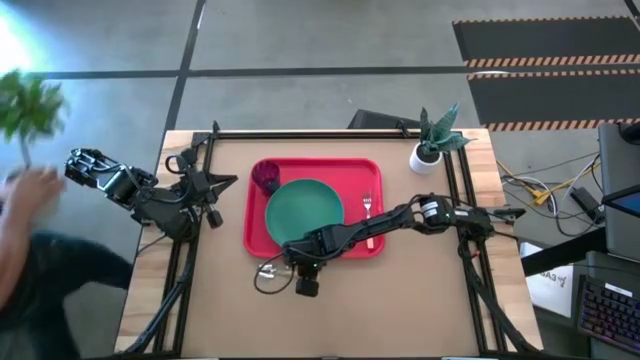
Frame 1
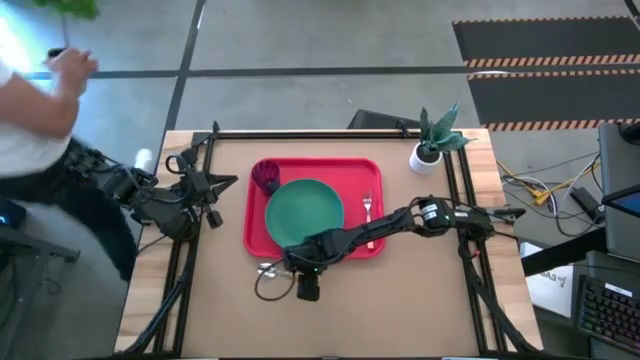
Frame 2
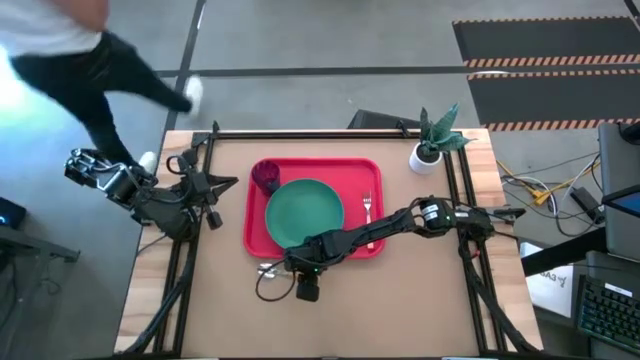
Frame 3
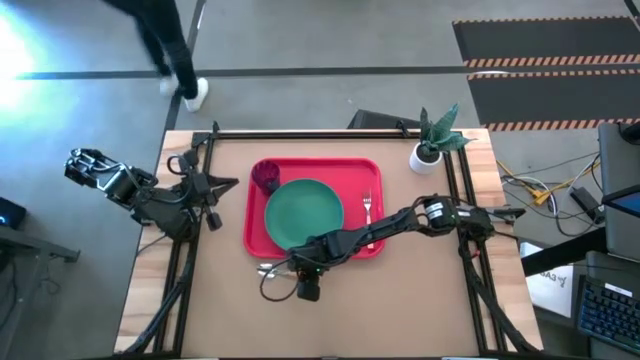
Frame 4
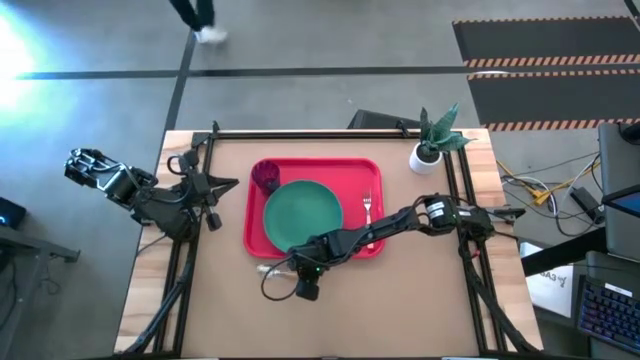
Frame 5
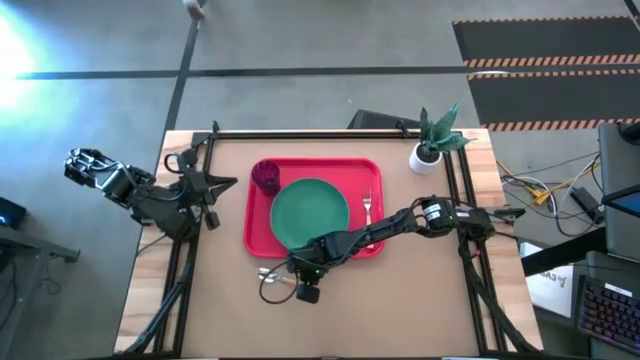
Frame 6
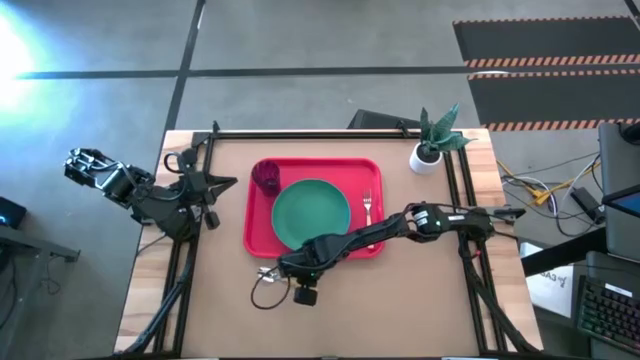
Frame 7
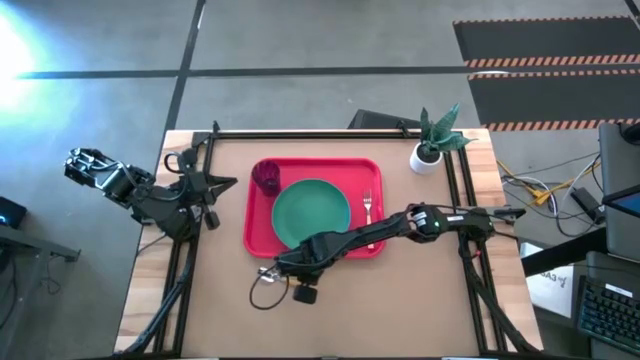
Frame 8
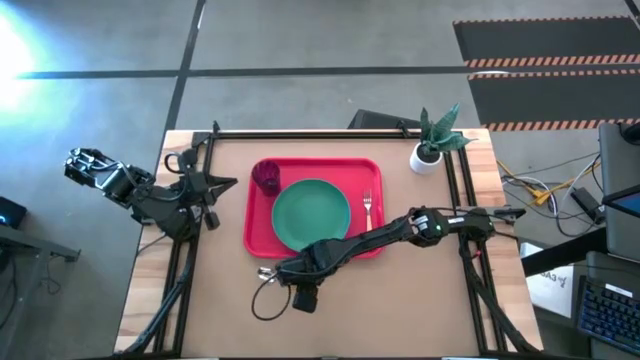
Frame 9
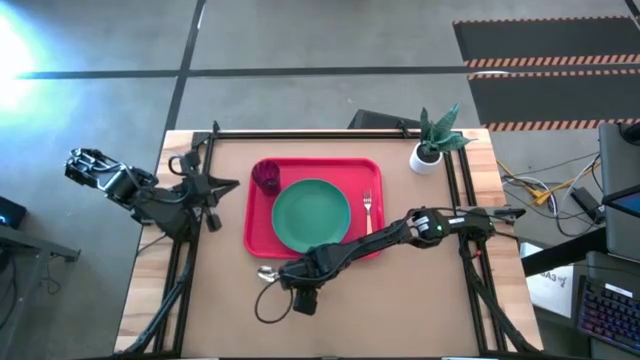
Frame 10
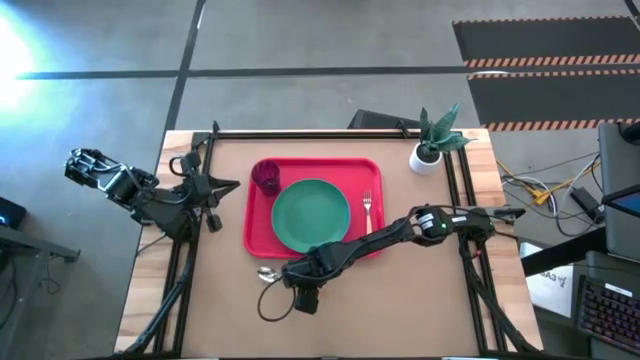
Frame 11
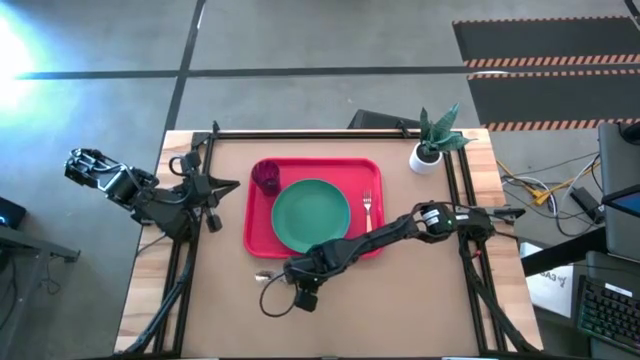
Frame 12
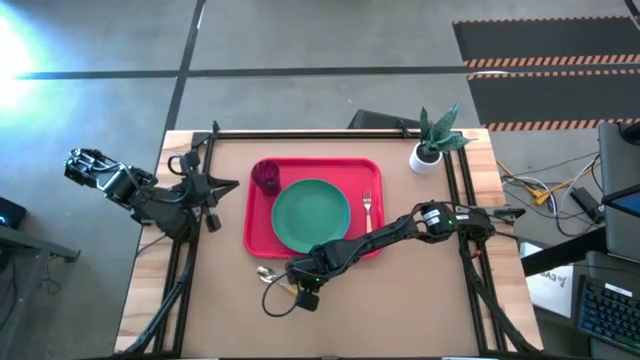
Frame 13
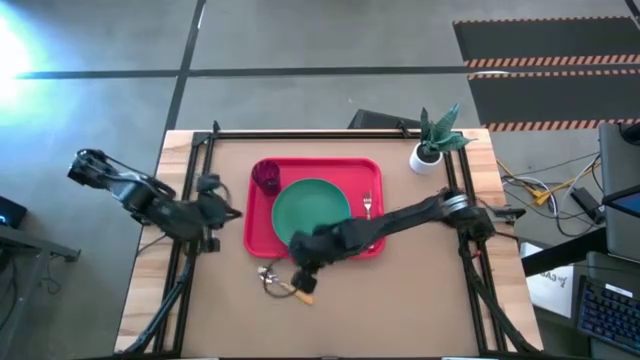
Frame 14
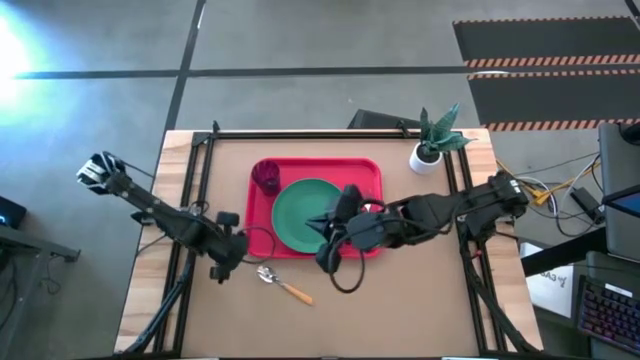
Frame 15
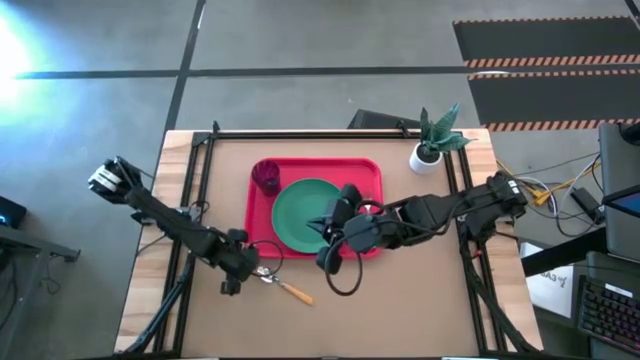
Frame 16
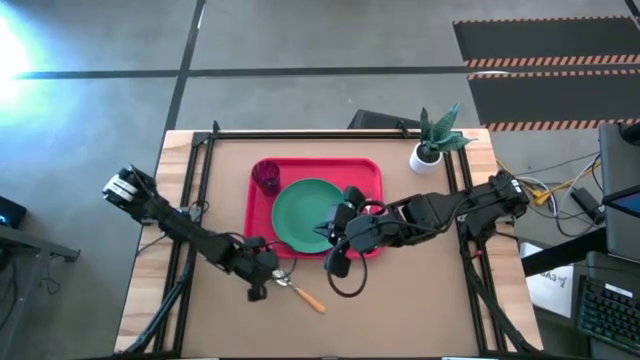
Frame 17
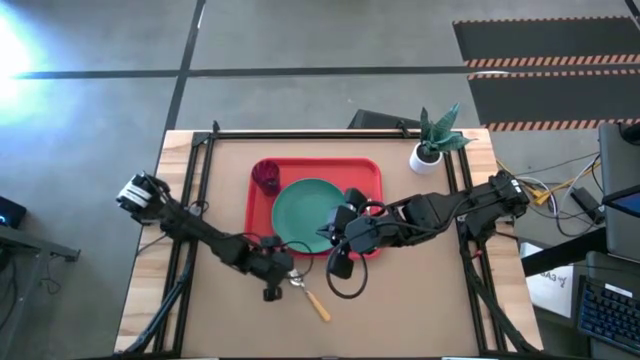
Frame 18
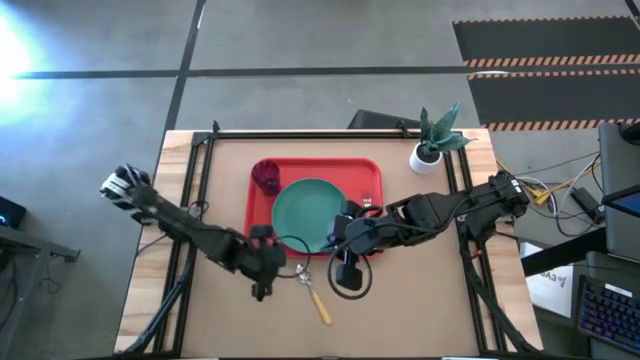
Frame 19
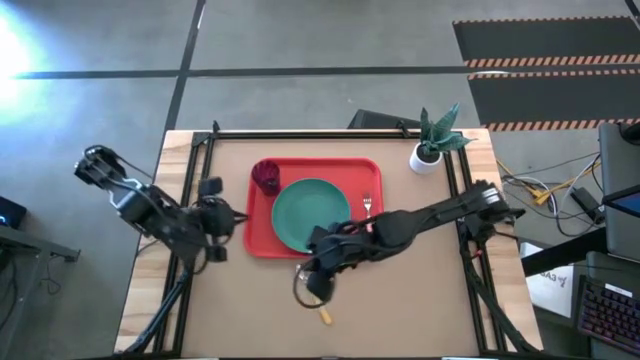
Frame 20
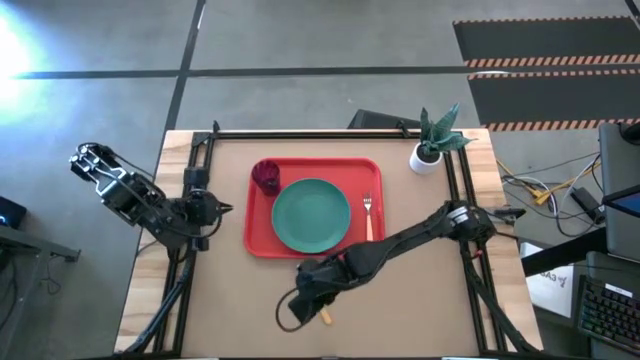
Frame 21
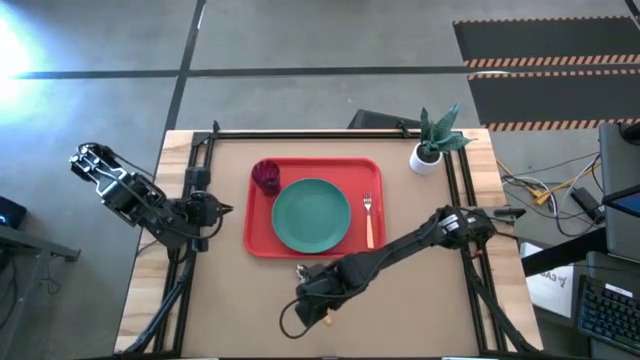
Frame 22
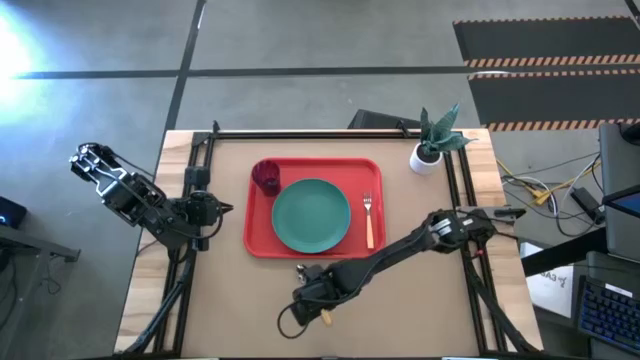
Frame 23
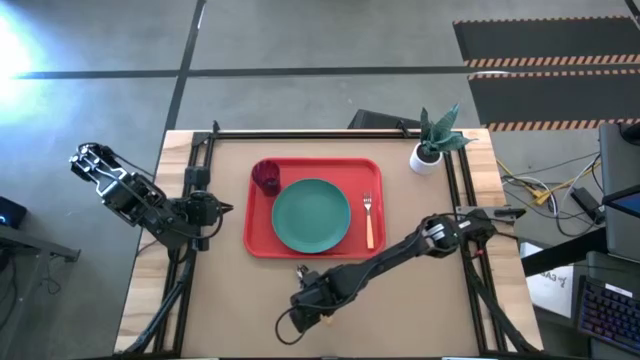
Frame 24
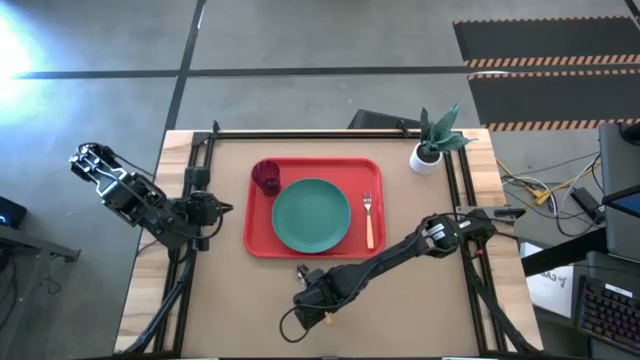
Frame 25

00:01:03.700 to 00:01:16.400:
Task: Pick and place plate/cup/fork/spoon on tray
Put the orange spoon to the left side of the orange fork on the orange tray

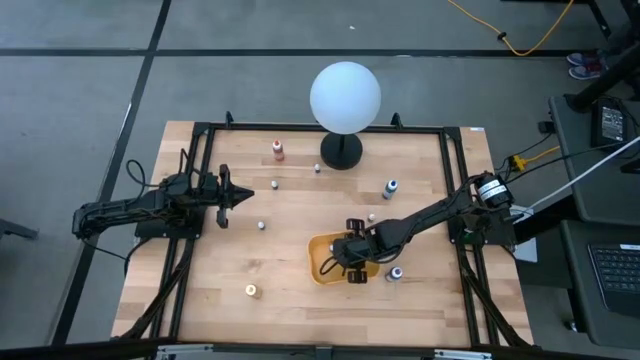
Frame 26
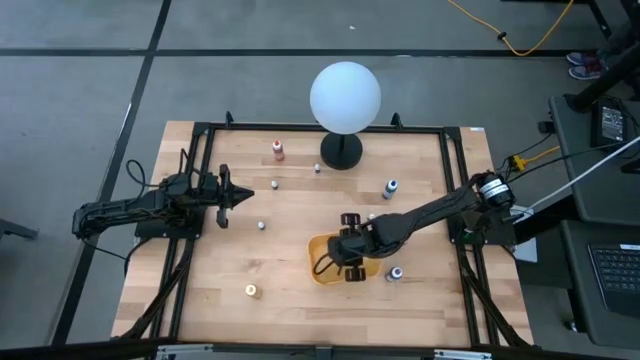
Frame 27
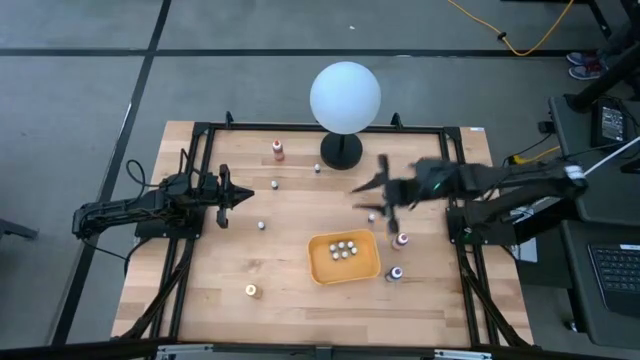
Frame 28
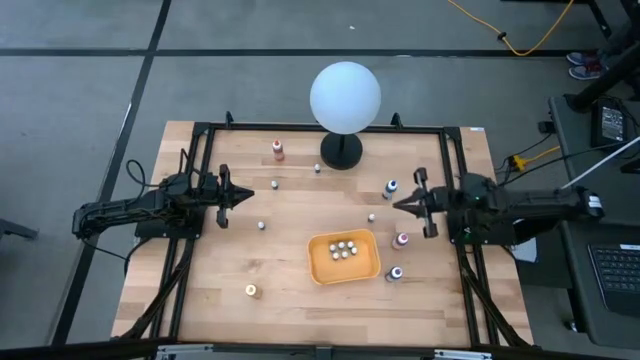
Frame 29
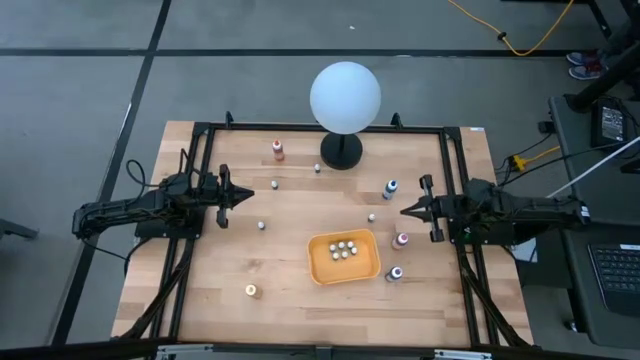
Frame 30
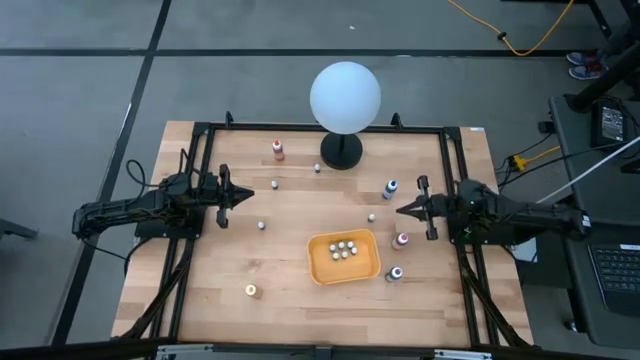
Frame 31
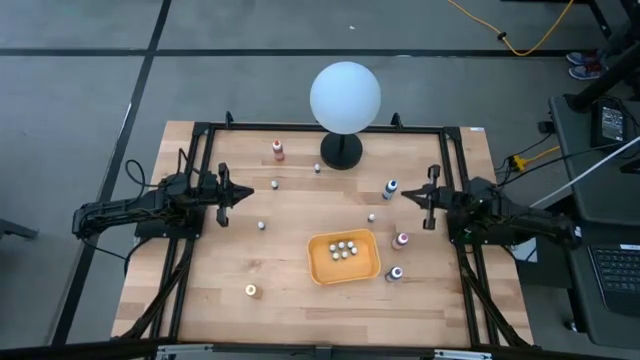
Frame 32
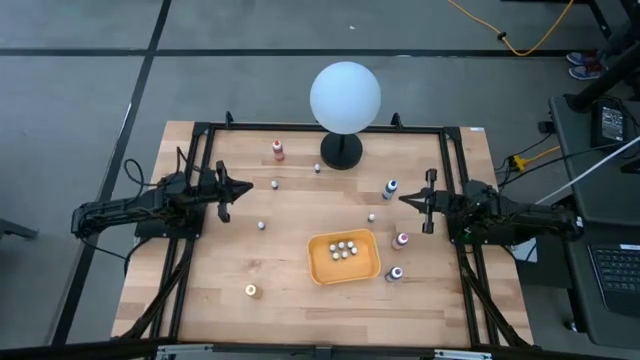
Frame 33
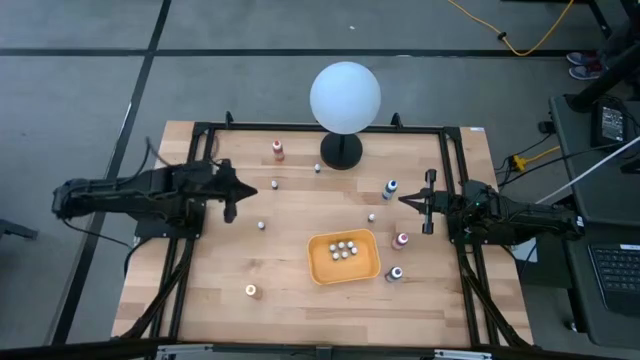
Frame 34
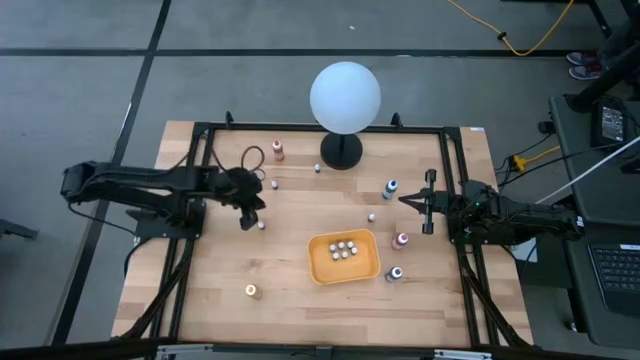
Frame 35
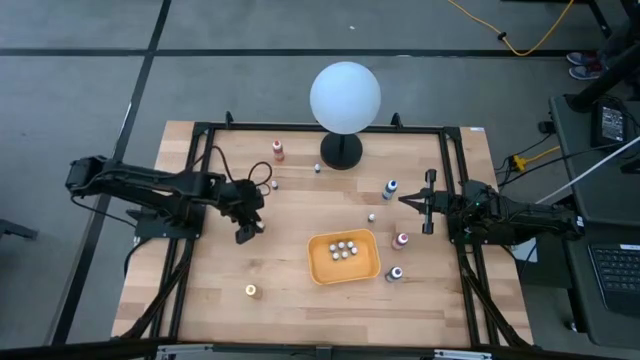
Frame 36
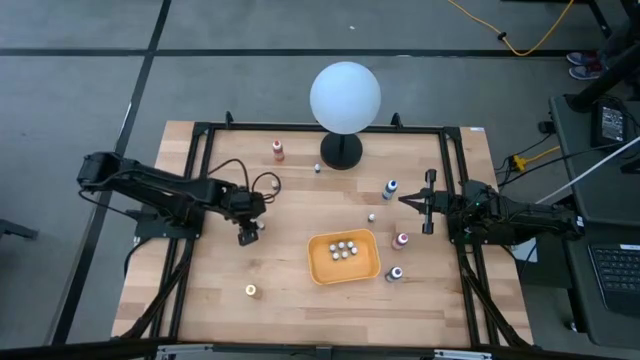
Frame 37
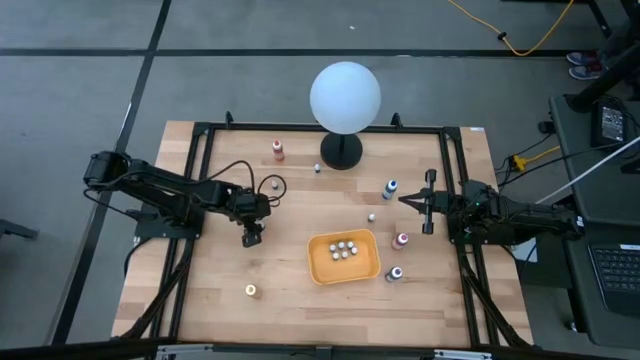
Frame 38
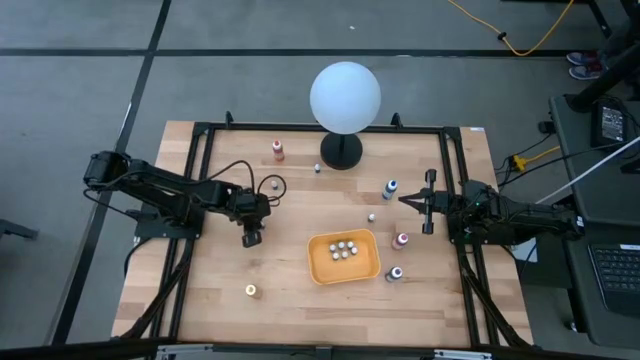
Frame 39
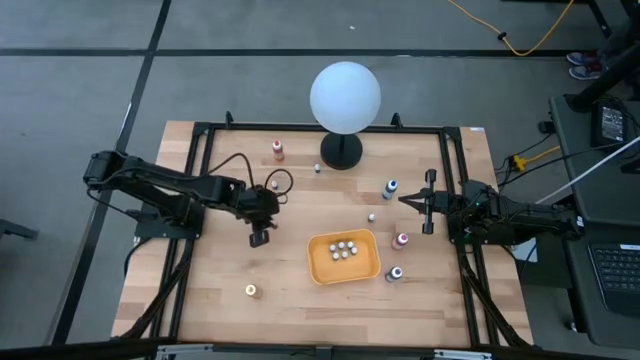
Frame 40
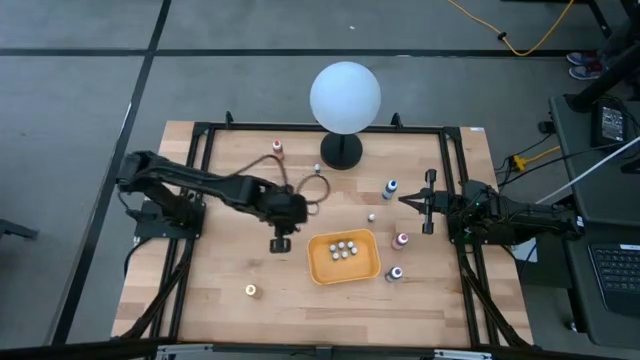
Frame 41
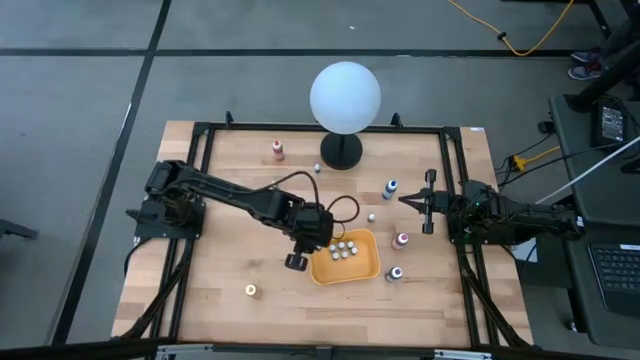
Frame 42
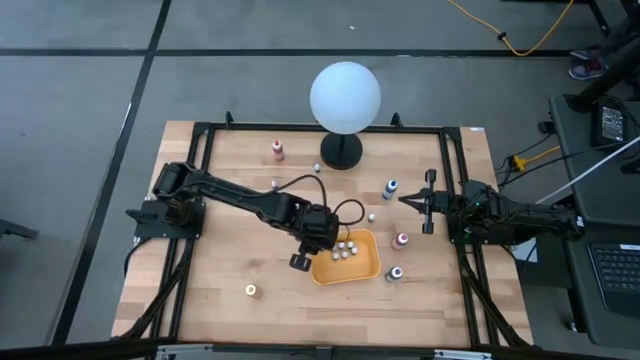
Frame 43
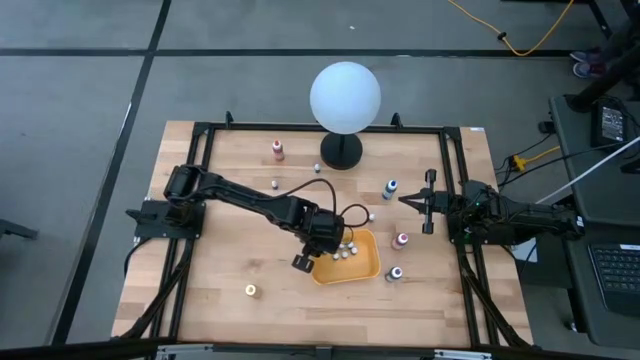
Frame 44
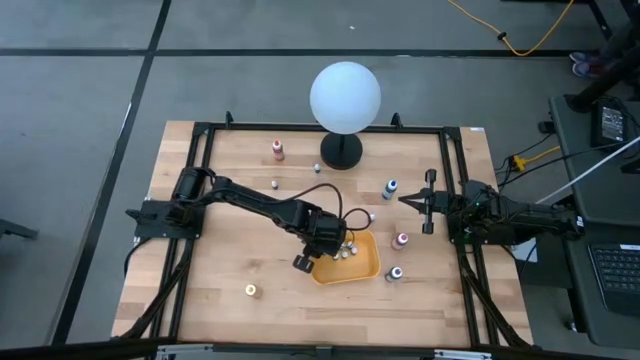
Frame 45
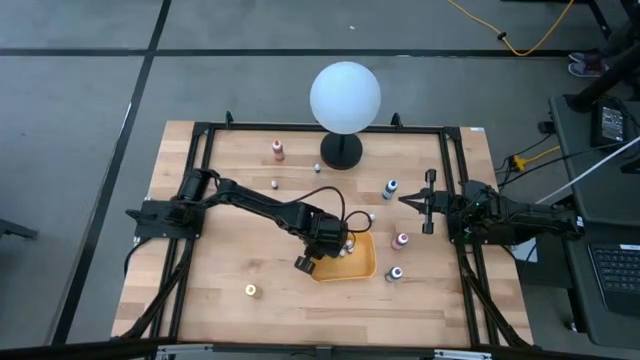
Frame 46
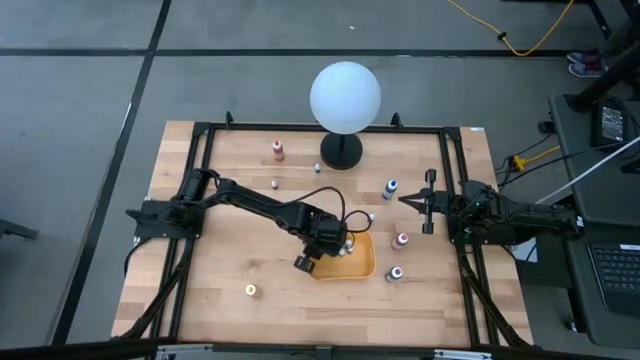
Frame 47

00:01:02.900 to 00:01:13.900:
Task: Pick & Place food coloring
Put the small pink food coloring bottle into the yellow bin
